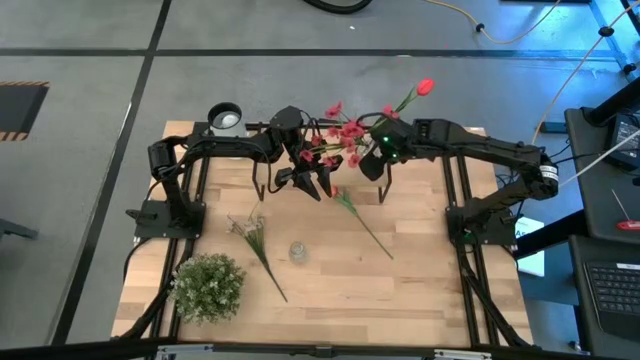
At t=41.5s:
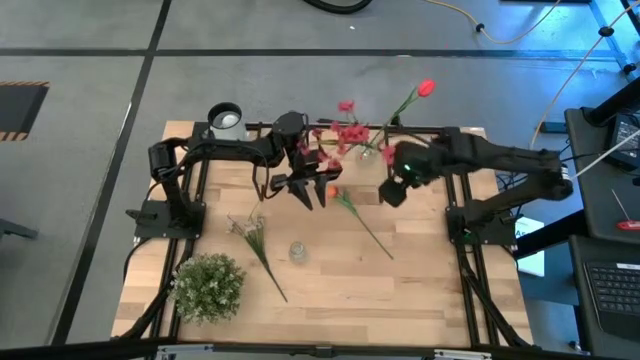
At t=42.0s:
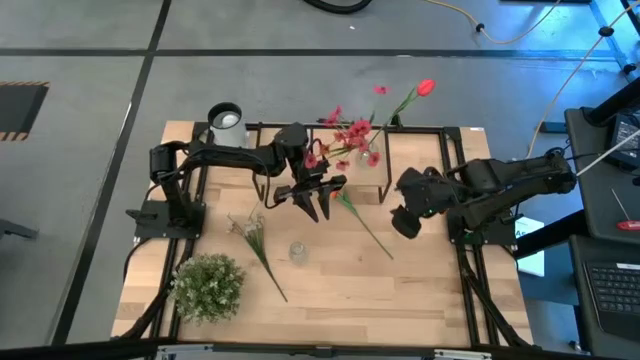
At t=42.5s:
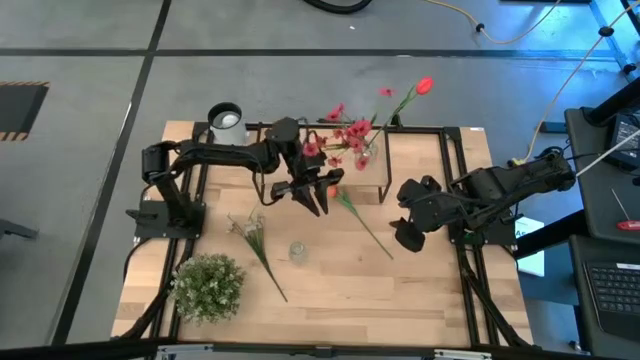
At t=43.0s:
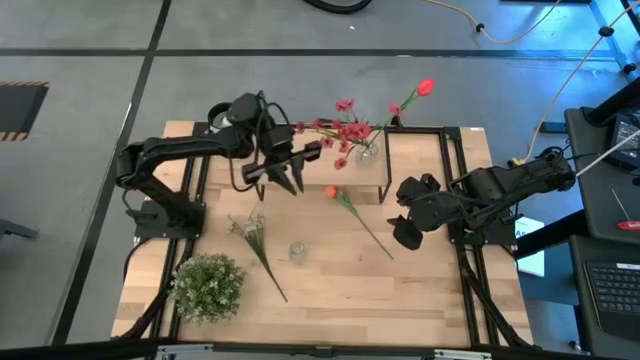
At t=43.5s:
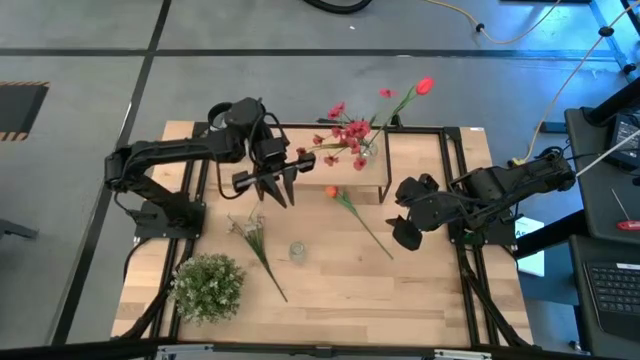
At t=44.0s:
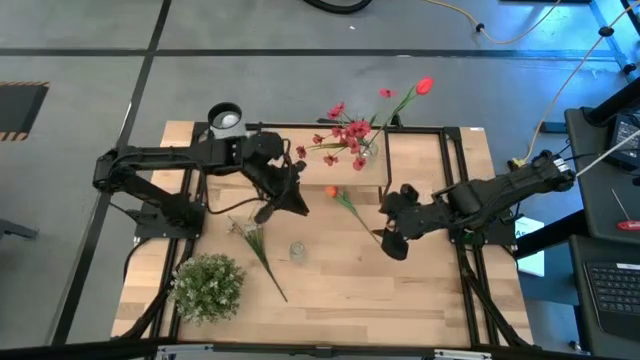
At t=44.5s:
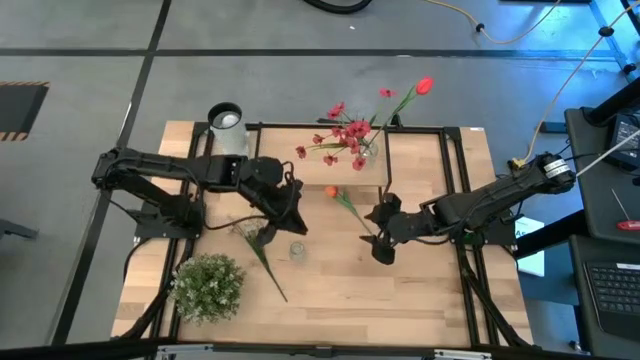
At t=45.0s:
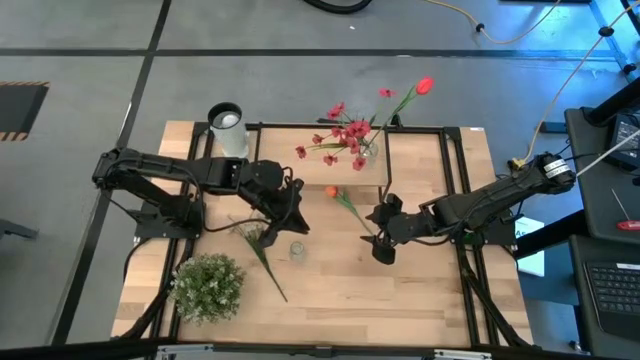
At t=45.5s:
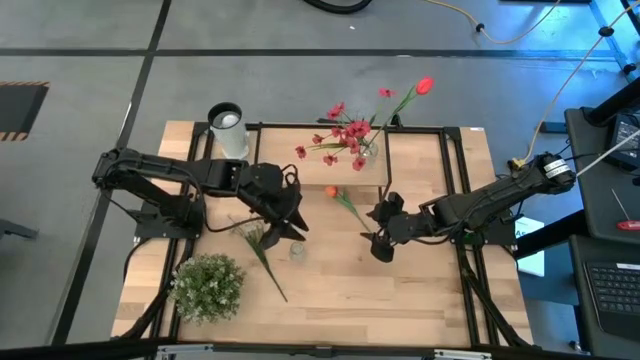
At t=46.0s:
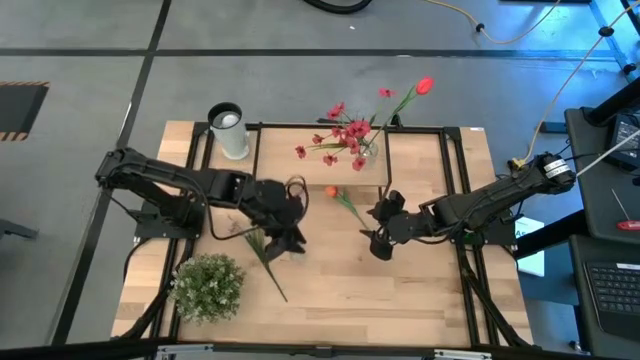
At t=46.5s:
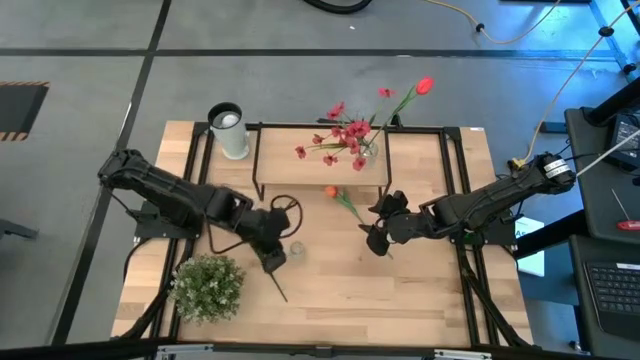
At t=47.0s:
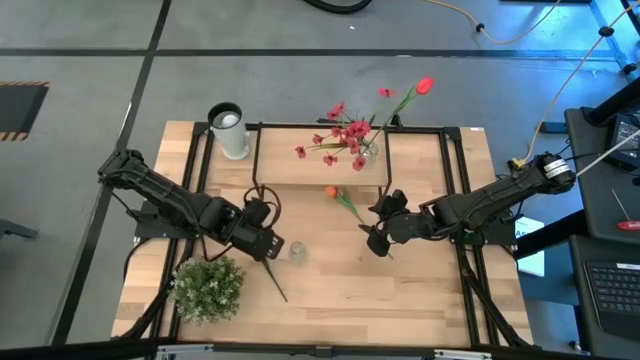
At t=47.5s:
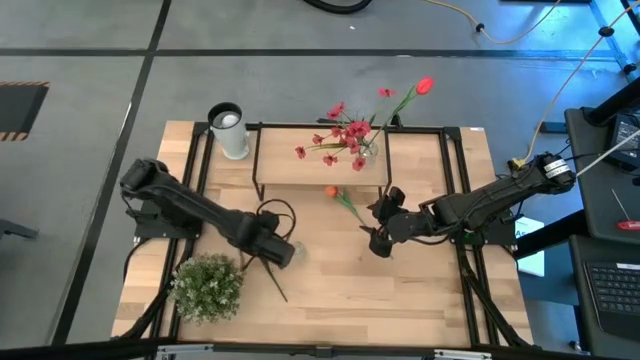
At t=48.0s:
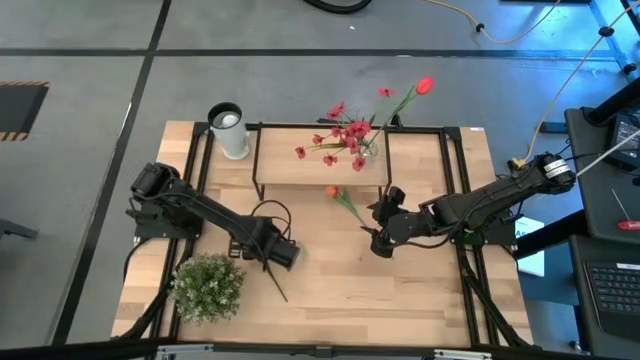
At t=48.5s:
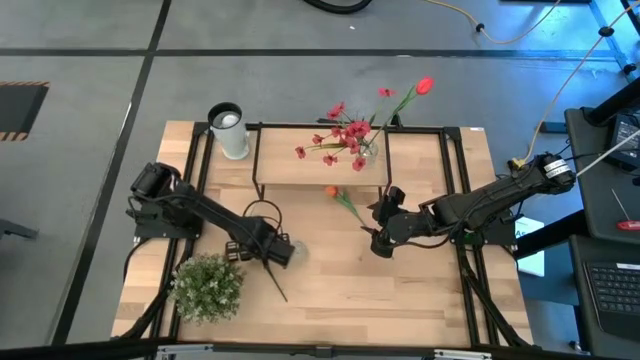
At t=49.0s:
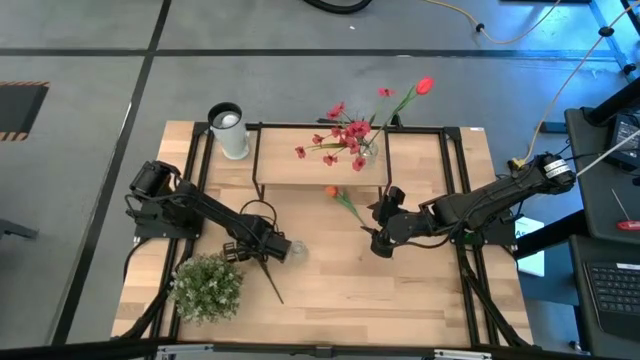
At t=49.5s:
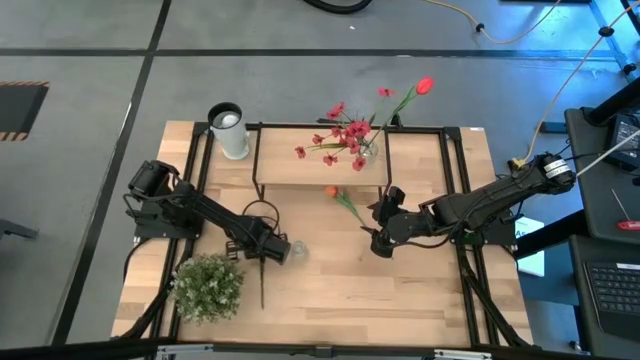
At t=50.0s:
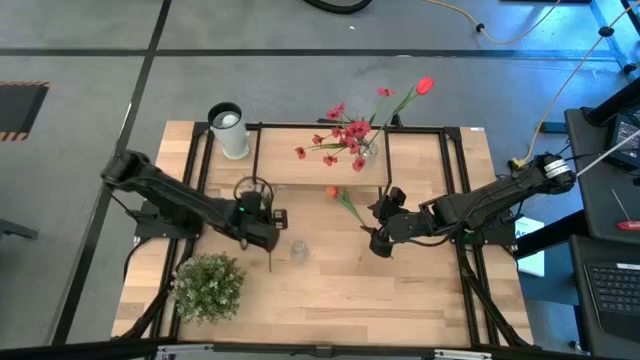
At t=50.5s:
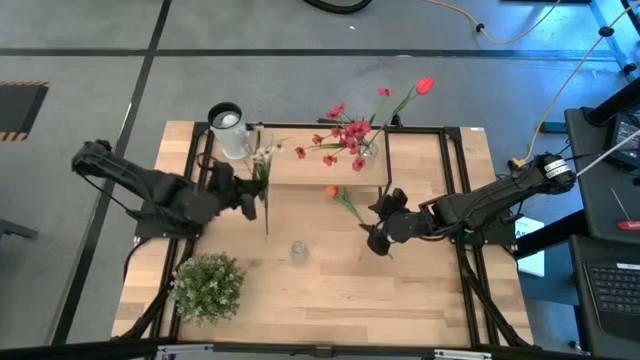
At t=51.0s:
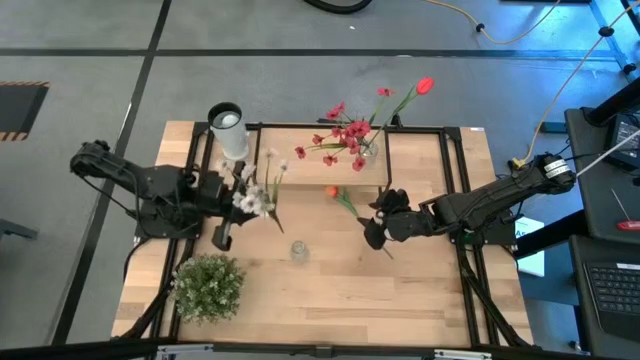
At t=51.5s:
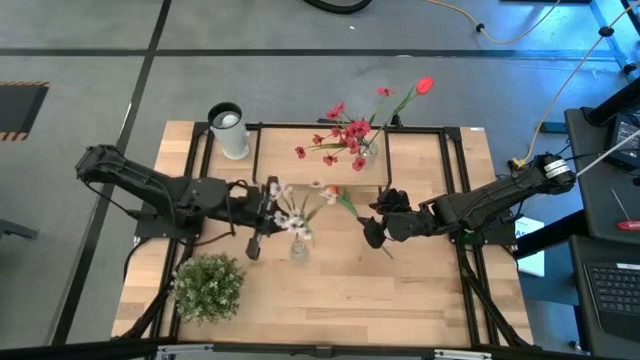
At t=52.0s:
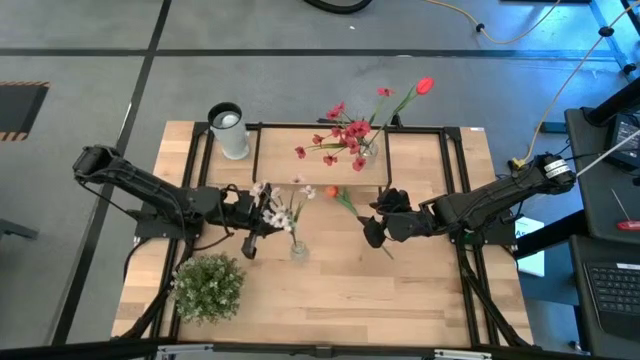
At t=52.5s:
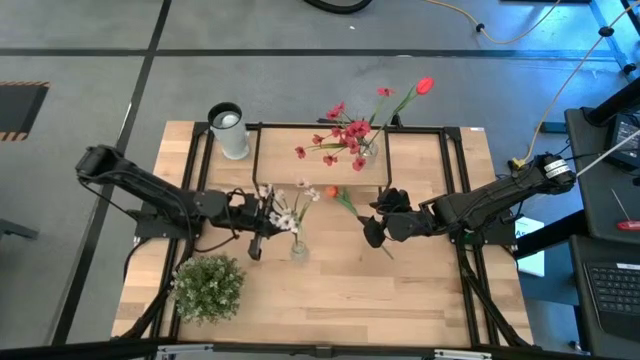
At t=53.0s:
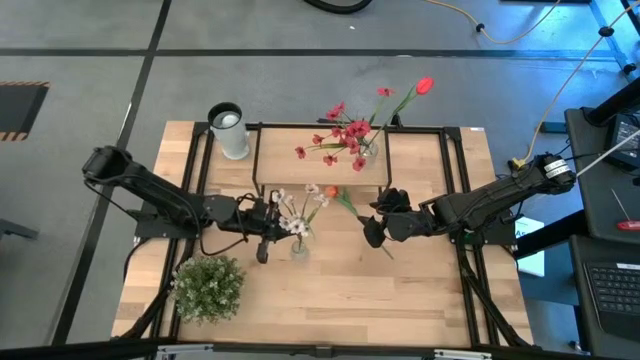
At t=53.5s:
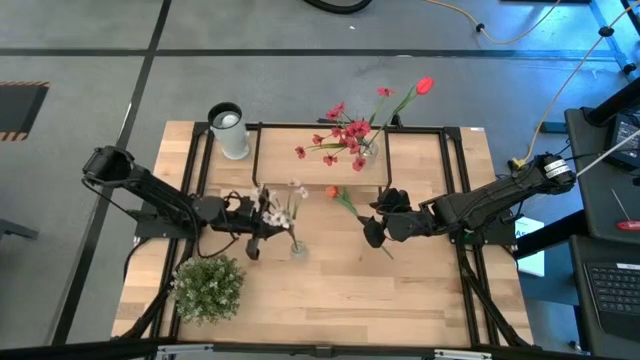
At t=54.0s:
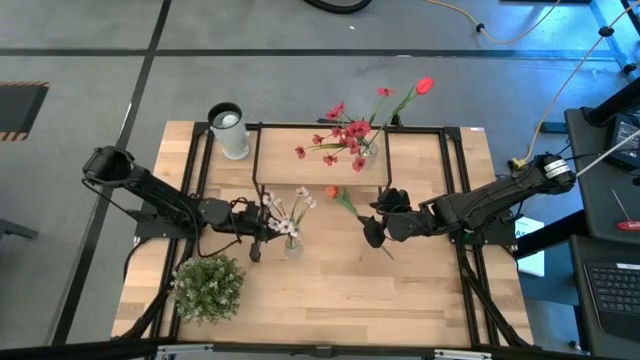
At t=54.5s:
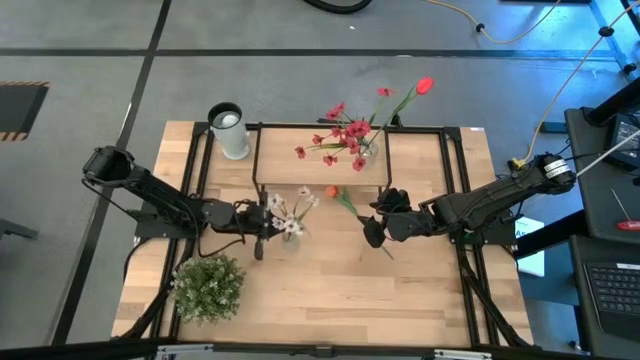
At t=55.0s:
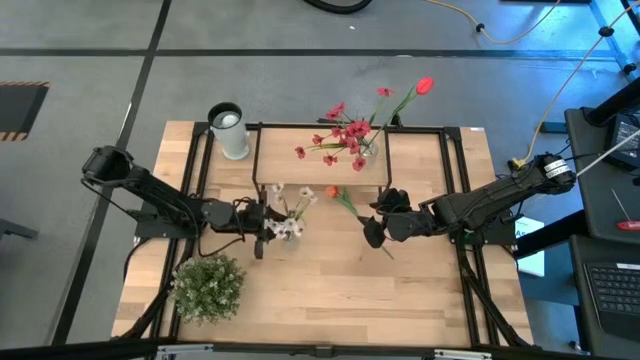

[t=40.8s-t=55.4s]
Task: Pick and place flowers into a vace then onto a shelf
Put the white flower into the transparent vase

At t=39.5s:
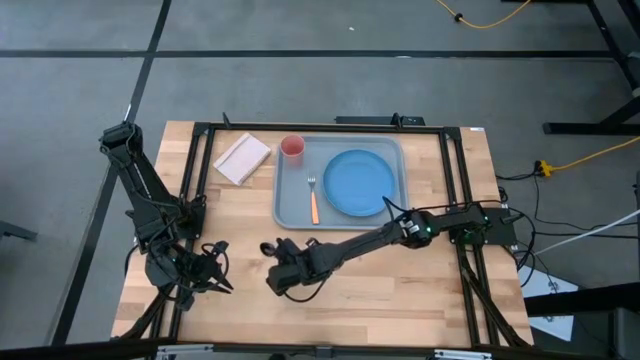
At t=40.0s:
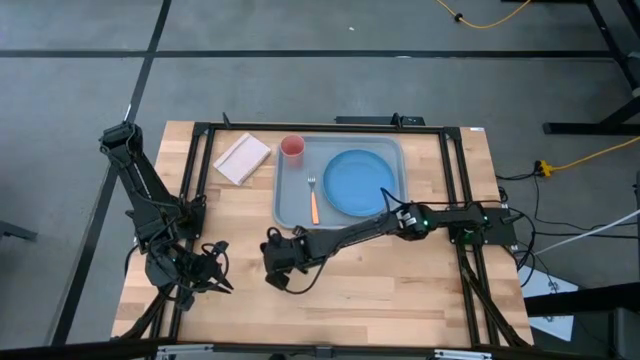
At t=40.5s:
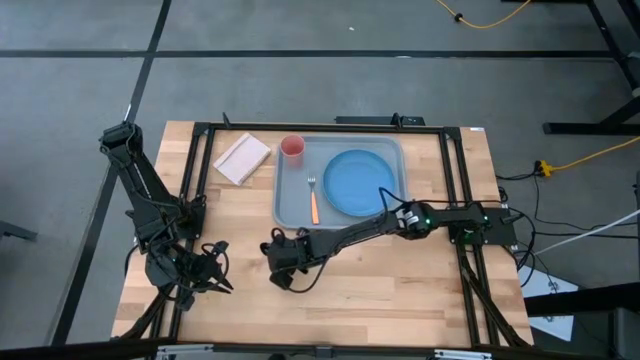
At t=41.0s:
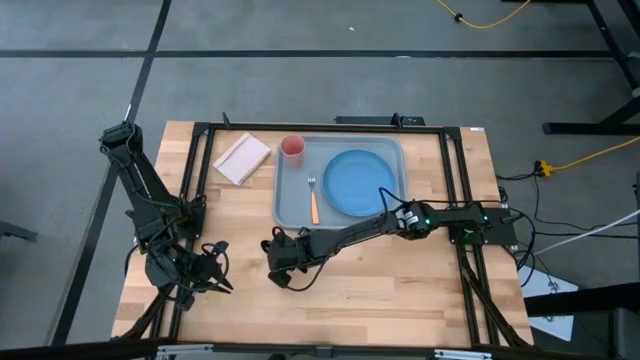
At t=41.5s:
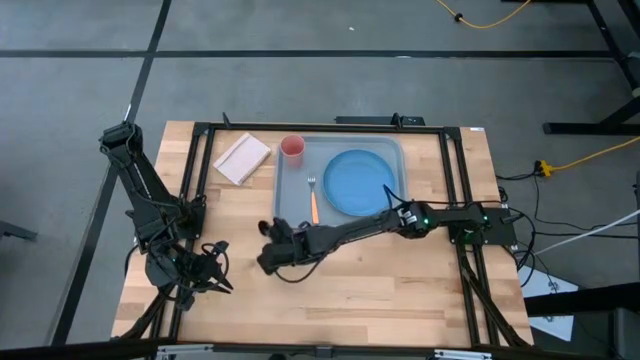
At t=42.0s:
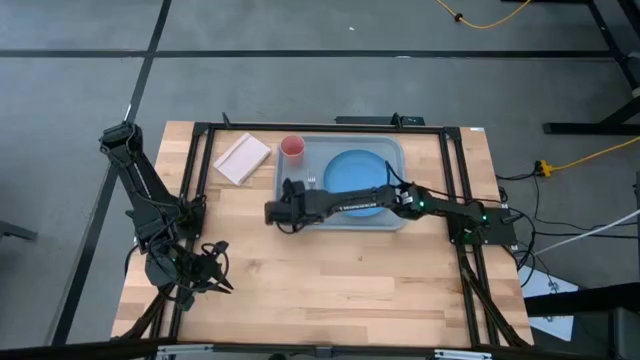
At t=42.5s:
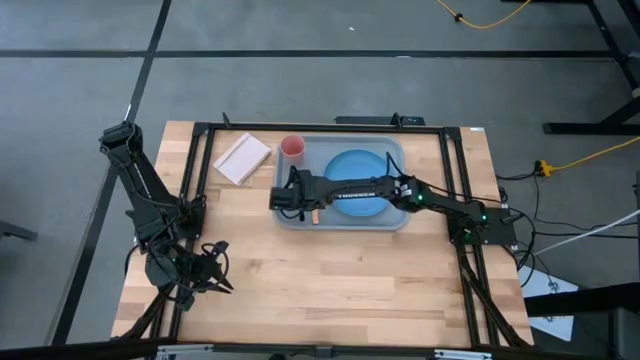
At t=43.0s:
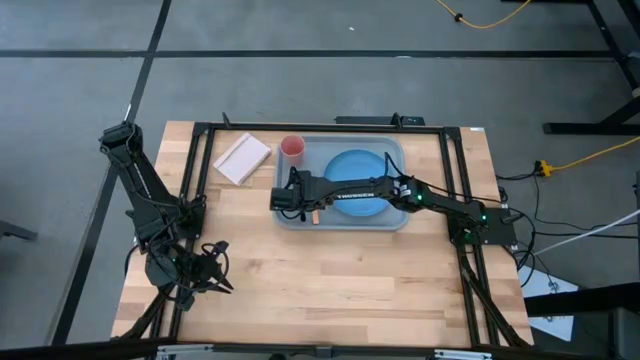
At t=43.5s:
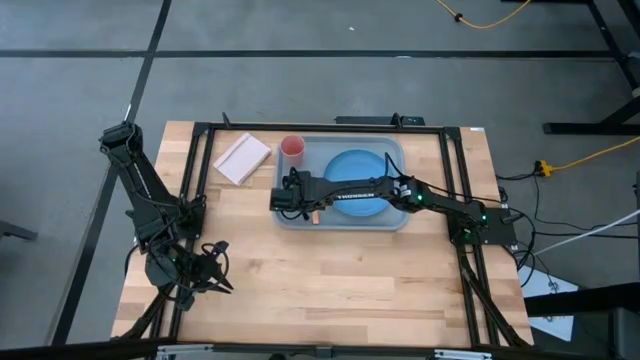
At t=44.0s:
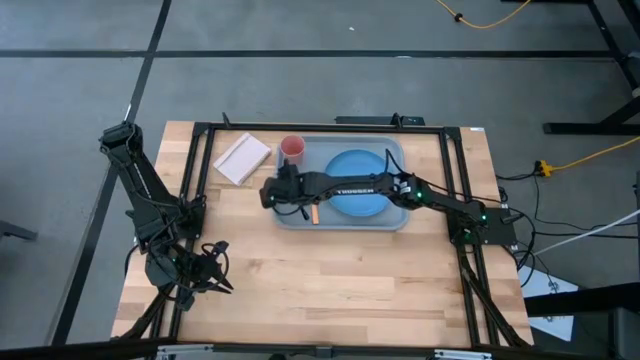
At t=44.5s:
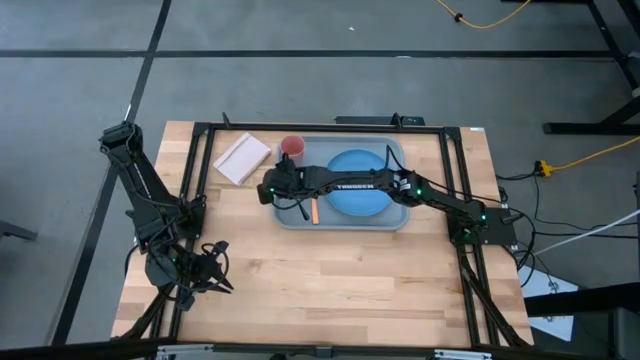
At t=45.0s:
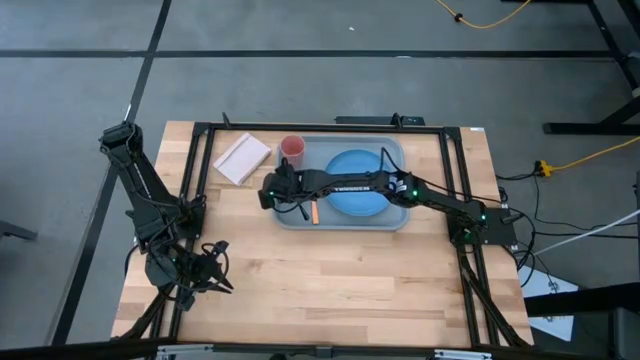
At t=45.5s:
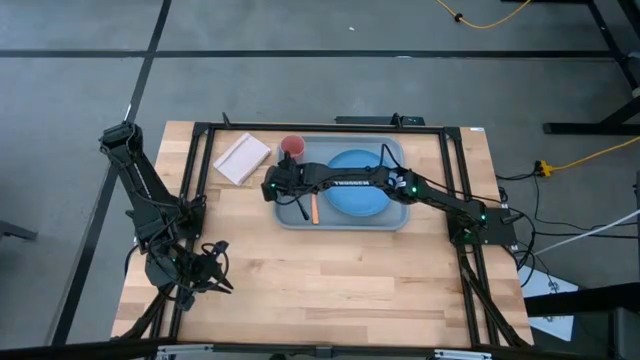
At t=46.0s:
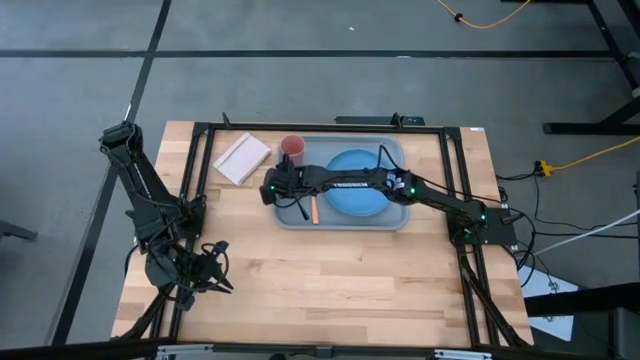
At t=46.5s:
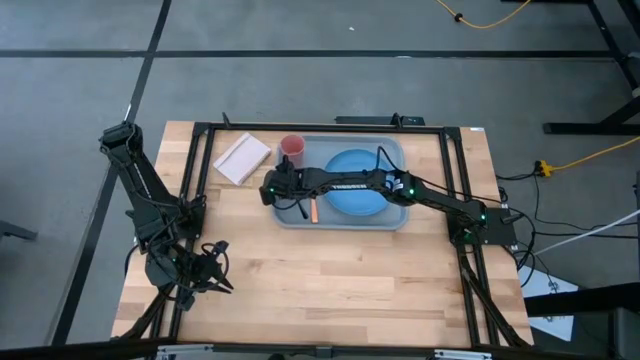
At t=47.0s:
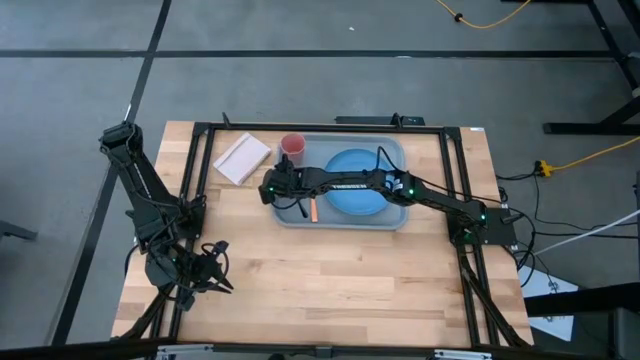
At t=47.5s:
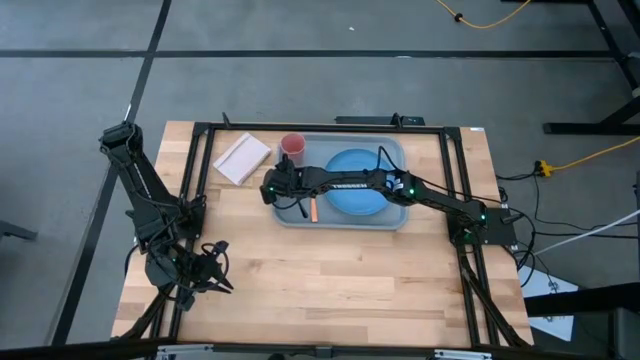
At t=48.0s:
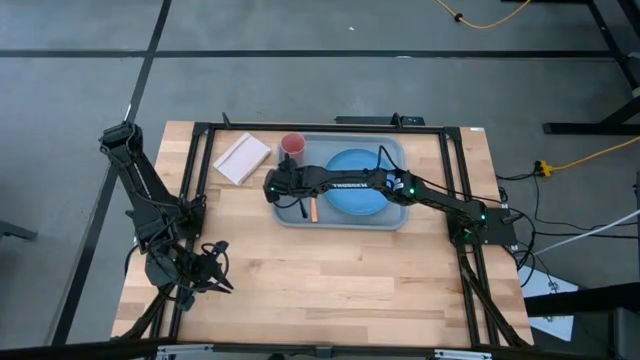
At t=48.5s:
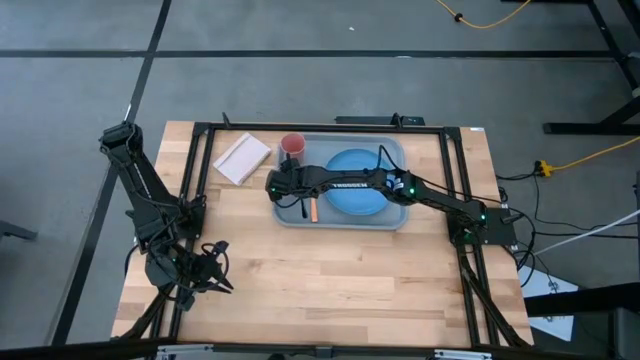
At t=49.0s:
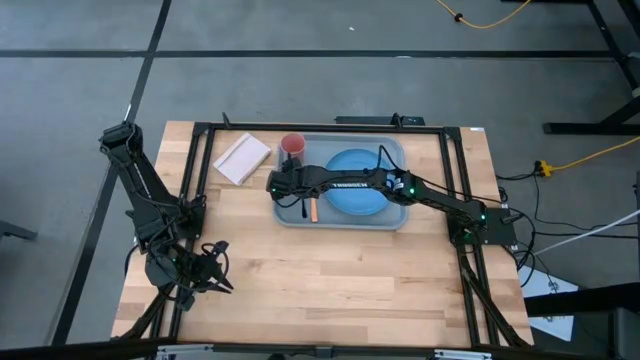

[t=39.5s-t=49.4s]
Task: Pick and place plate/cup/fork/spoon on tray
Put the black spoon on the gray serving tray to the left of the orange fork
